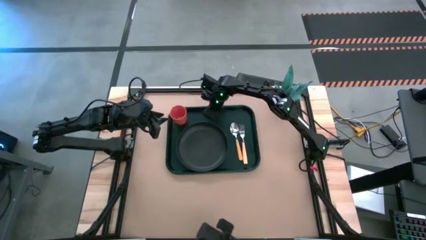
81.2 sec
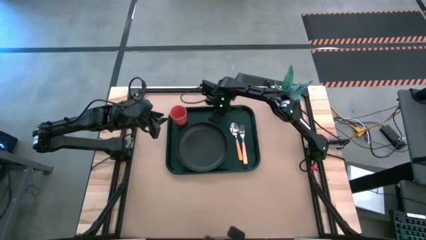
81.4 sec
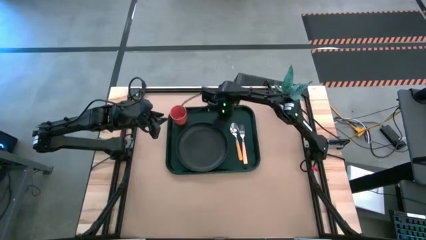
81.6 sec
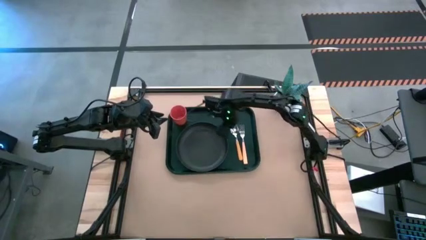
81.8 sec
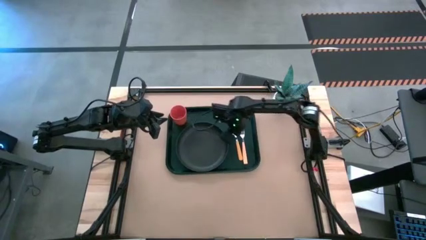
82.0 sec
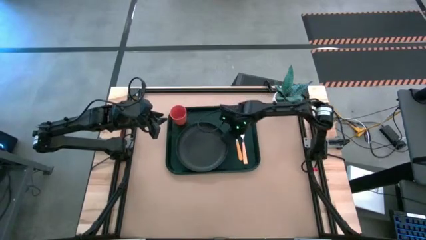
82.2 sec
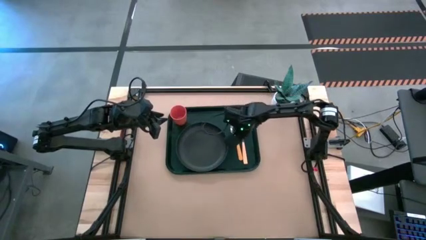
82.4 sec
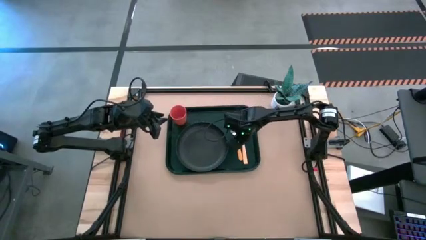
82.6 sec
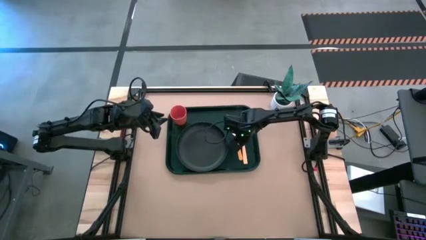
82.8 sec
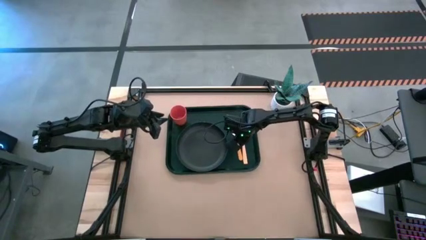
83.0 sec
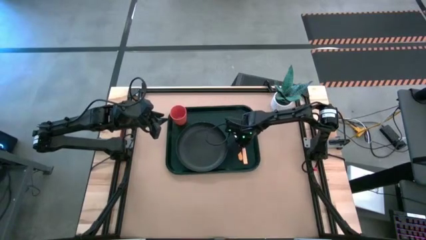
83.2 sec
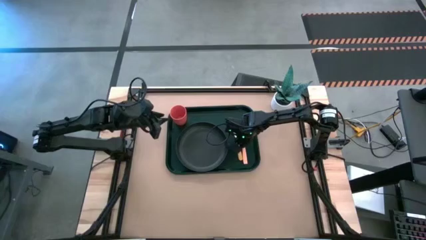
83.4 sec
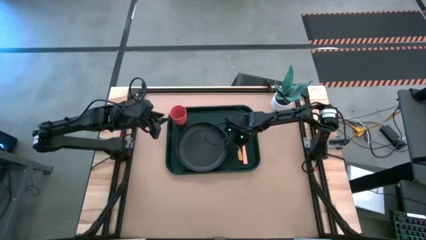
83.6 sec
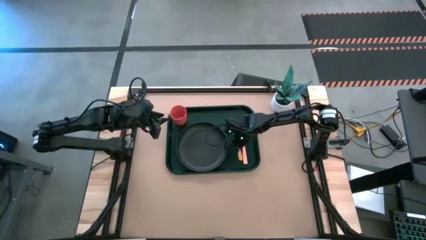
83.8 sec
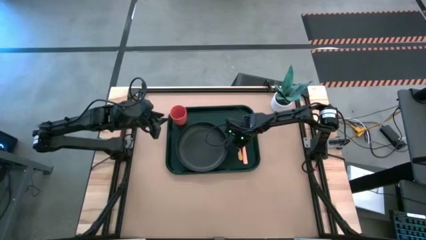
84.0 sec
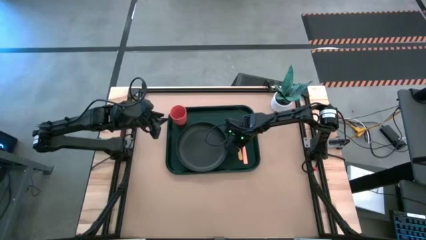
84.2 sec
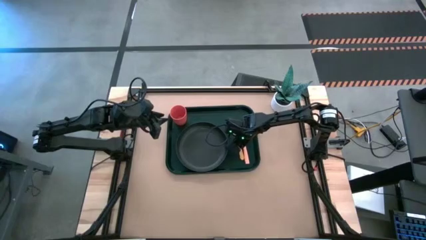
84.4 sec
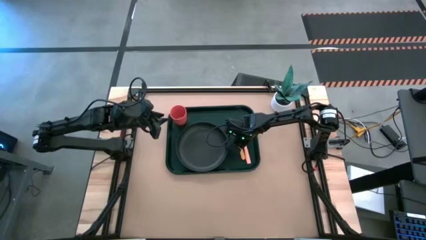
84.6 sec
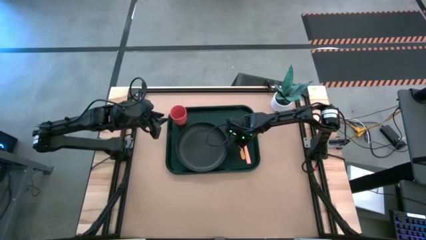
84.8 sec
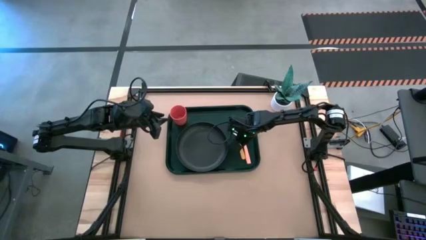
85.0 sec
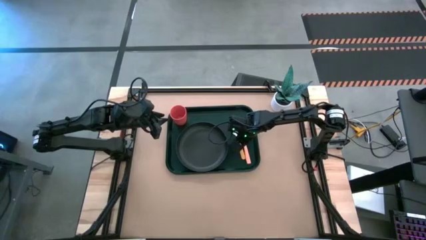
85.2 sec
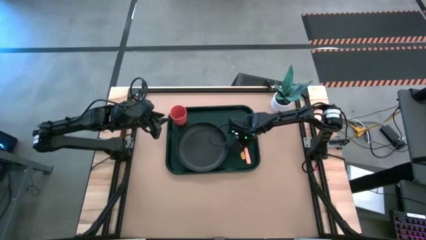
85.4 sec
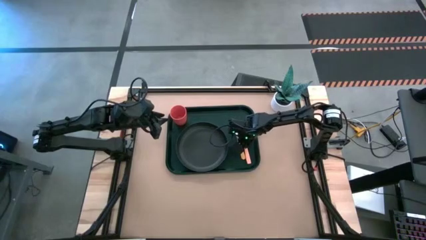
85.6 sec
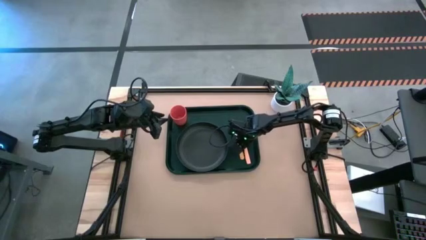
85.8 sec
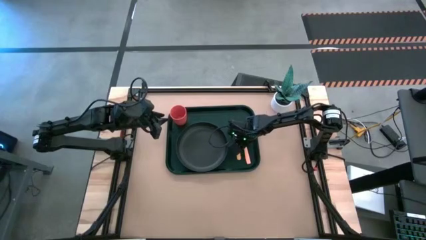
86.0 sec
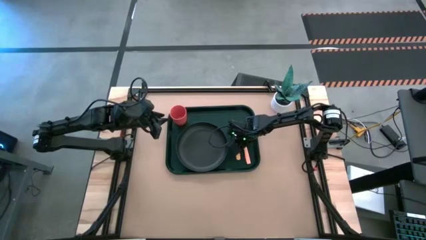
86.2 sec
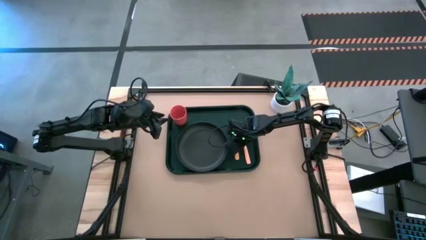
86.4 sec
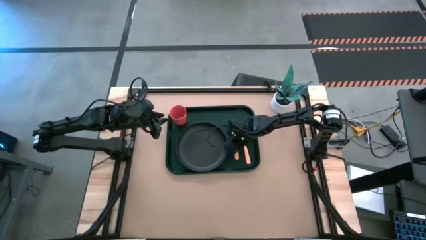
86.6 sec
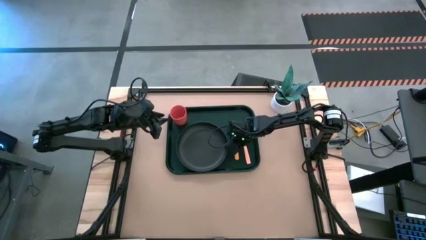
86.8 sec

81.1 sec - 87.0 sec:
Task: Pick and place plate/cup/fork/spoon on tray
Adjust the orange spoon on the black tray

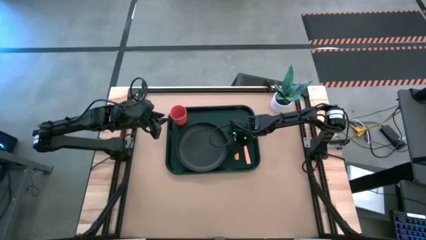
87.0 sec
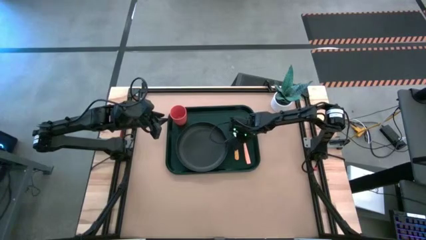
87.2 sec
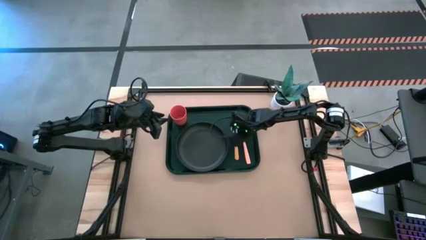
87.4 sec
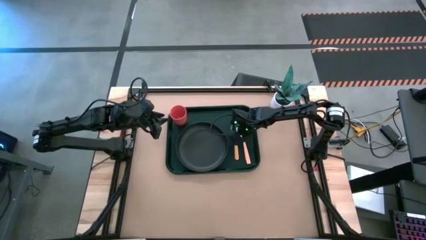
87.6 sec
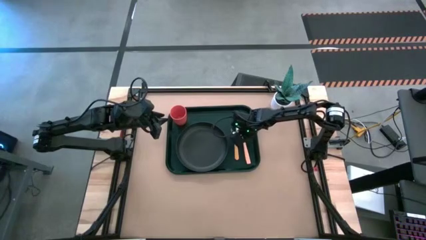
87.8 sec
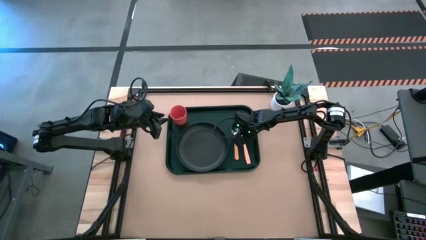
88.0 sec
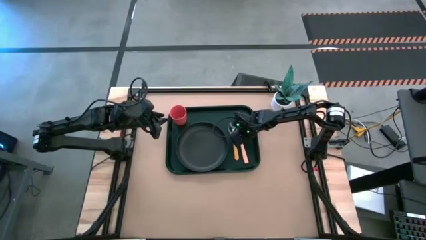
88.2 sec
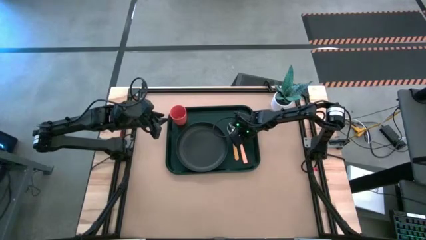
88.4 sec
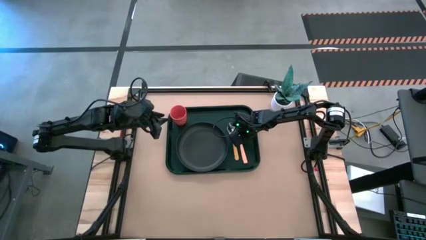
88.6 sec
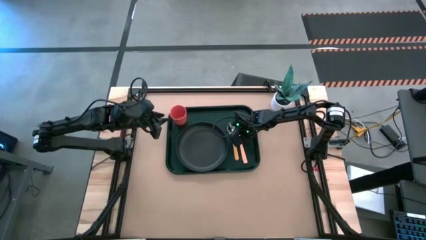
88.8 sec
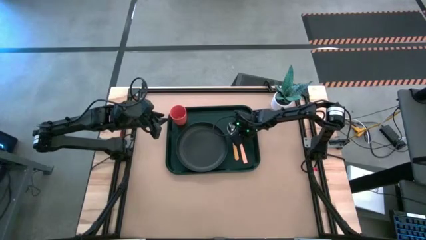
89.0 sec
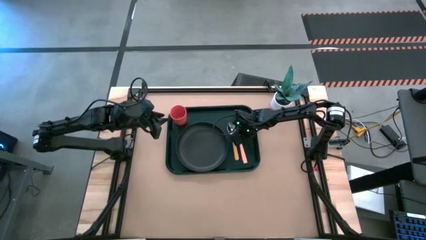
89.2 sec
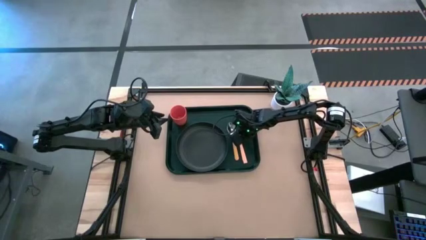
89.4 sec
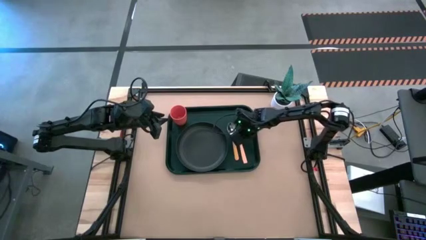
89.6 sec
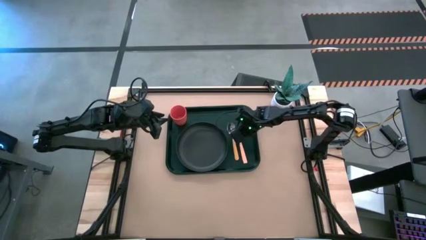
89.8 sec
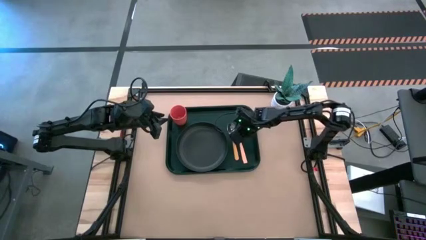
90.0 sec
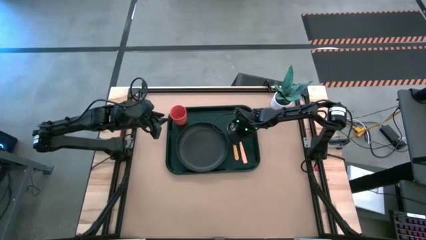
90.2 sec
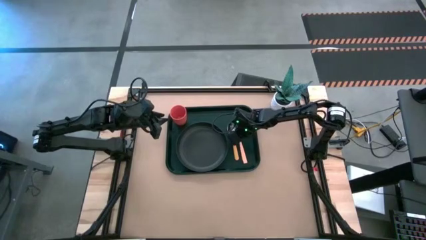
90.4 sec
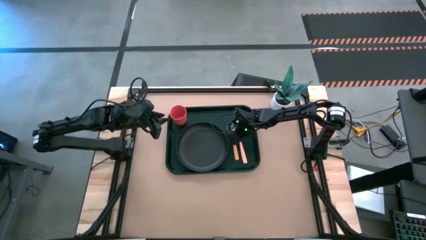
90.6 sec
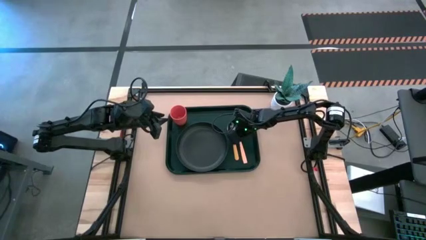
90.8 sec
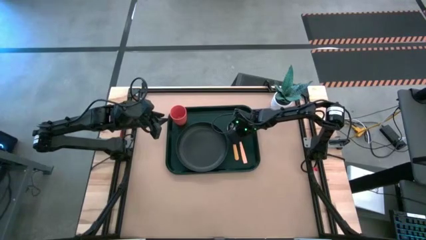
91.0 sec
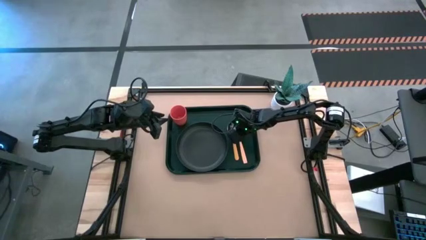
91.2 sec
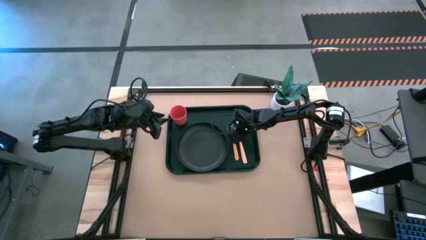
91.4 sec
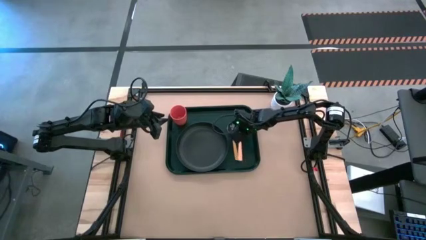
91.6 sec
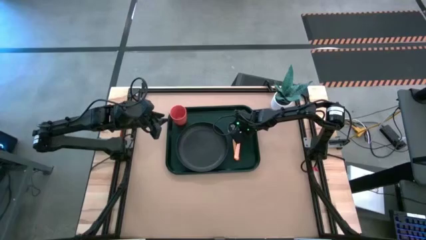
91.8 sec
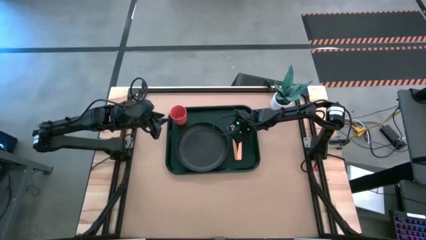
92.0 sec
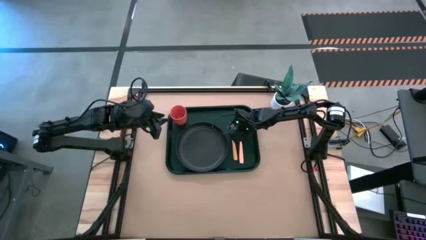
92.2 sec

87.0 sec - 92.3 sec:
Adjust the orange fork on the black serving tray

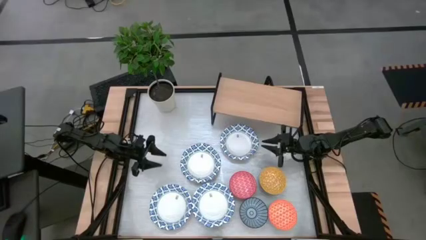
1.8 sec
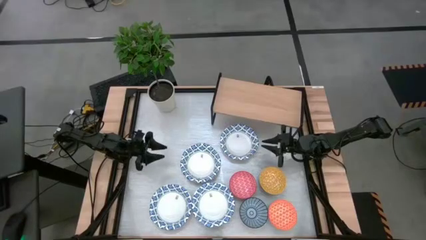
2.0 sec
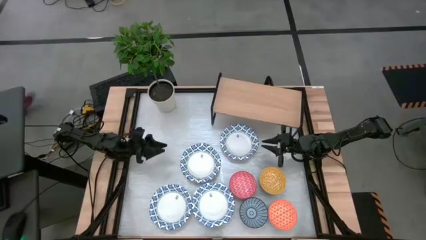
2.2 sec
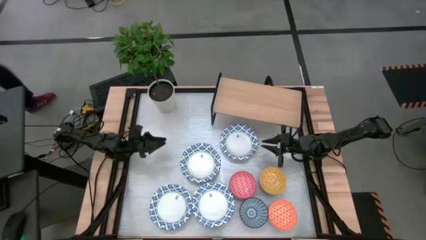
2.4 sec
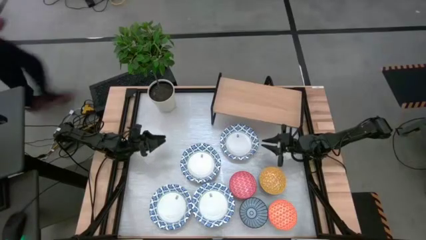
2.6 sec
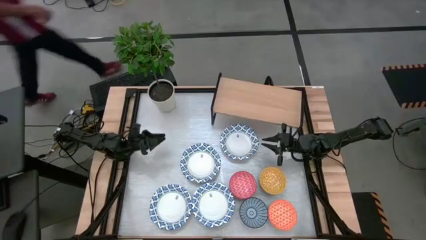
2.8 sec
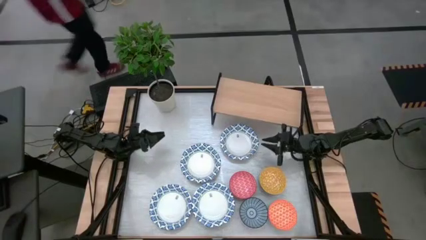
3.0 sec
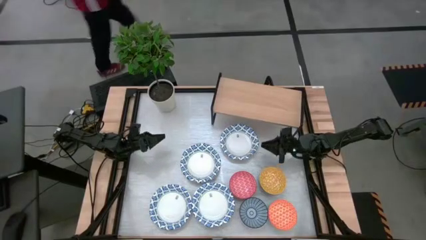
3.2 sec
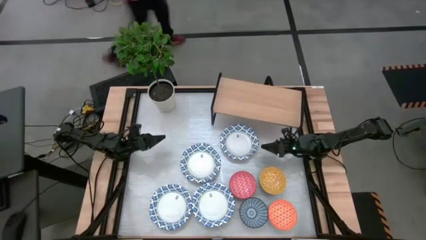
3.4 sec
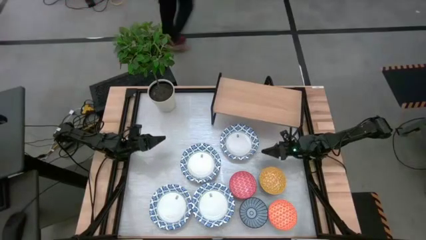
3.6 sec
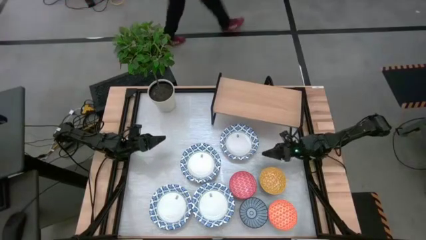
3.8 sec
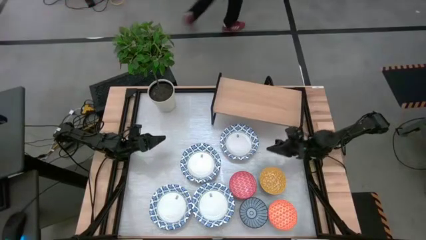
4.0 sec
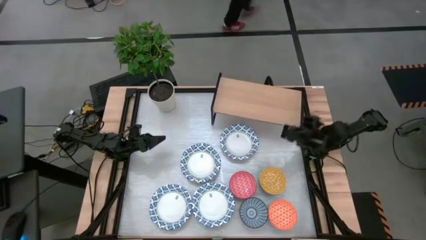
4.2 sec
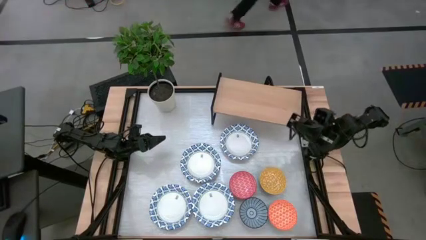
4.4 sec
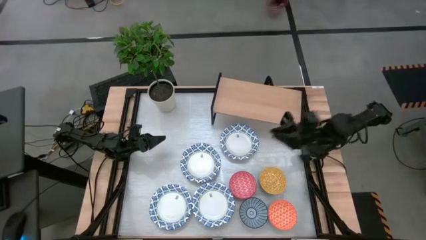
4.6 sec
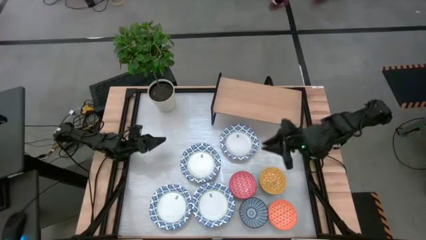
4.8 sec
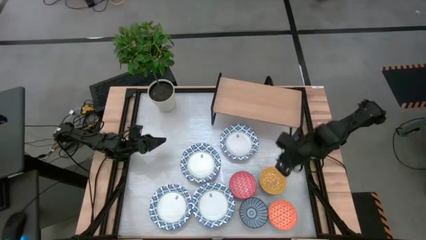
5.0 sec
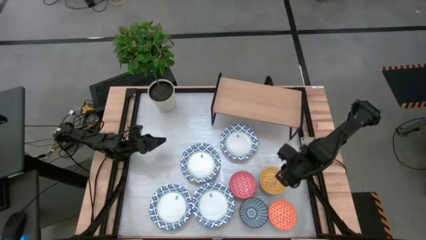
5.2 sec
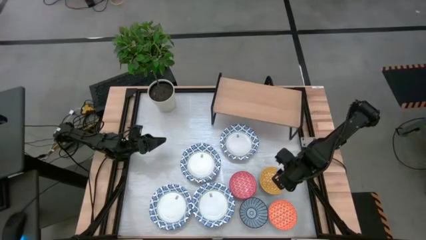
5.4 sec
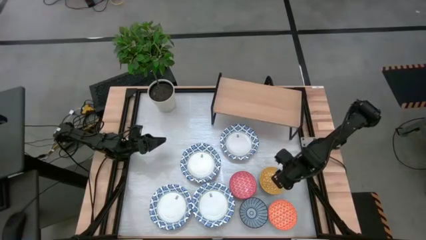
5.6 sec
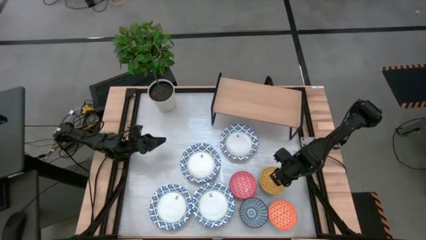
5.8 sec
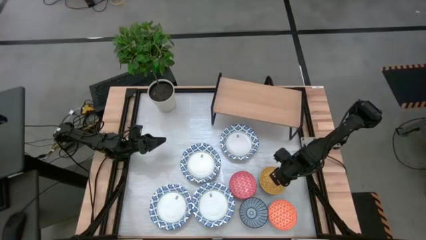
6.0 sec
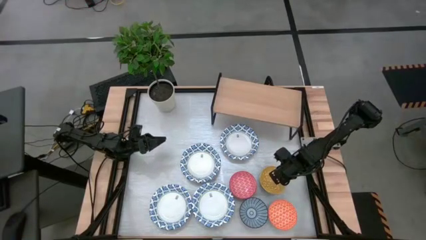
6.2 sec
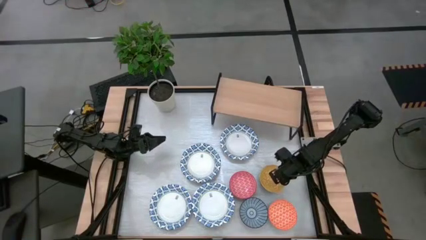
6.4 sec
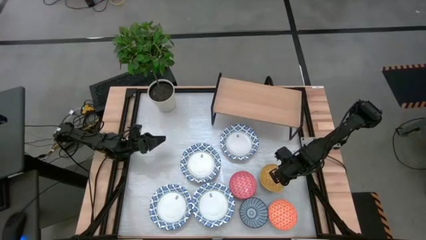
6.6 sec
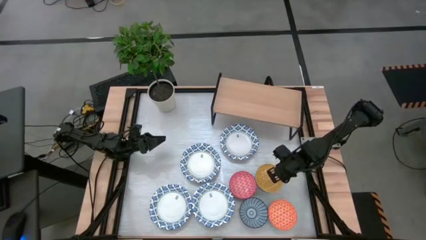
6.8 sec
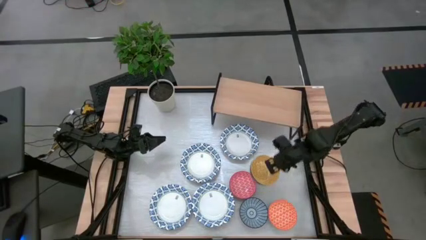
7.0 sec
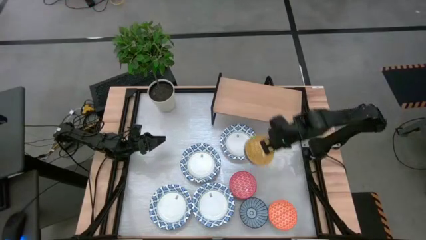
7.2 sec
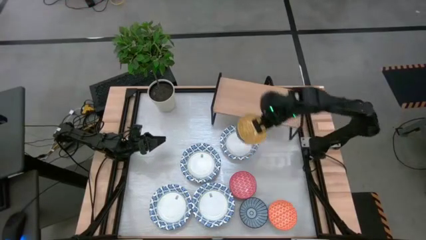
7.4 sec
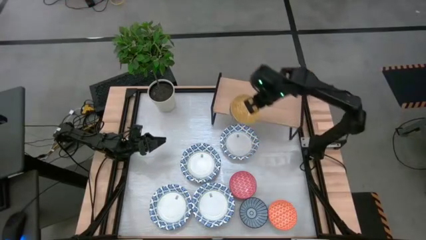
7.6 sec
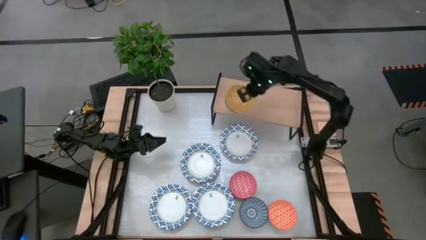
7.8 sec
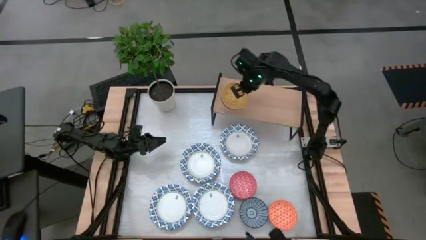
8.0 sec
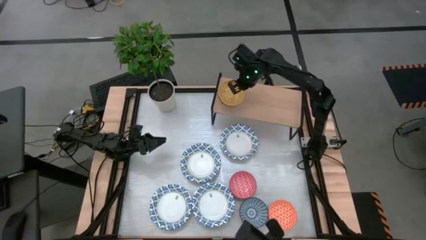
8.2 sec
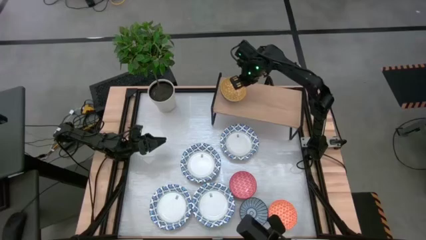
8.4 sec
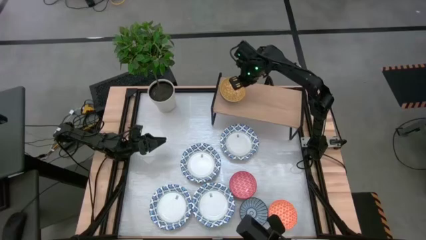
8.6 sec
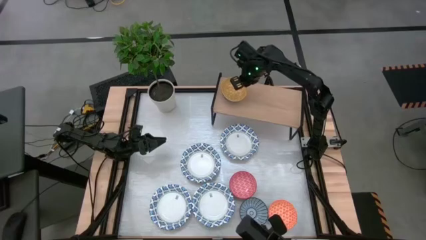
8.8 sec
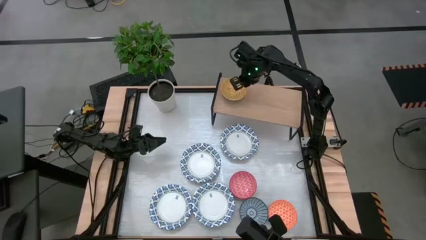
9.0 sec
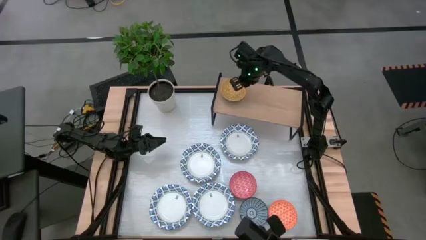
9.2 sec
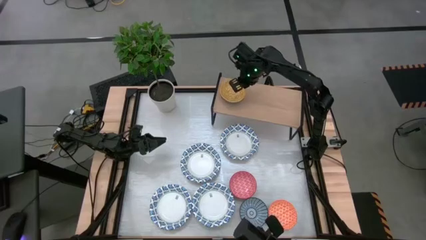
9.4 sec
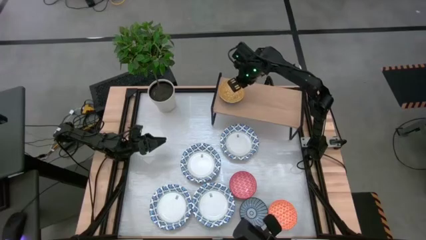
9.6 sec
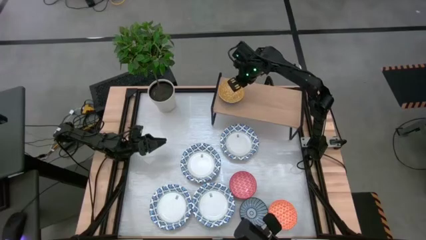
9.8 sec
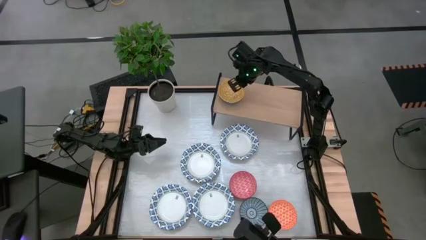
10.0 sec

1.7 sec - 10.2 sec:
Task: Place and stack bowls onto a shelf
Put the yellow bowl on the shelf
